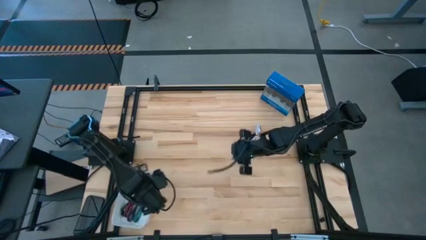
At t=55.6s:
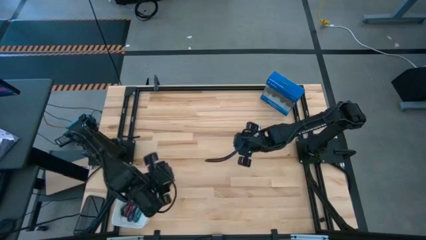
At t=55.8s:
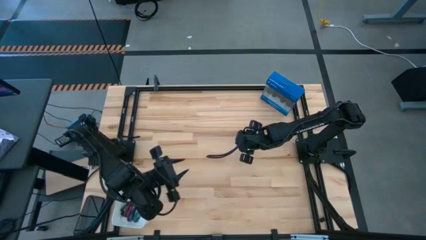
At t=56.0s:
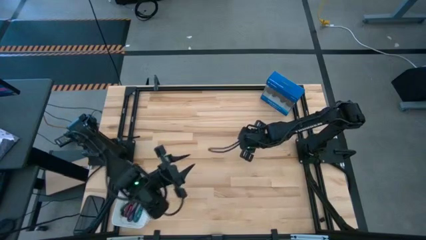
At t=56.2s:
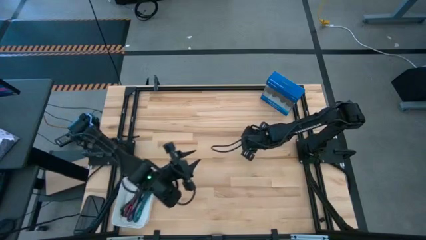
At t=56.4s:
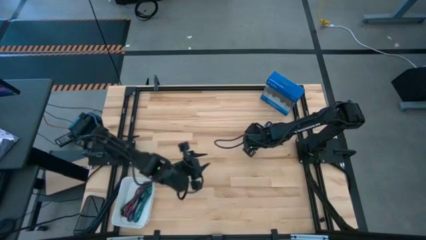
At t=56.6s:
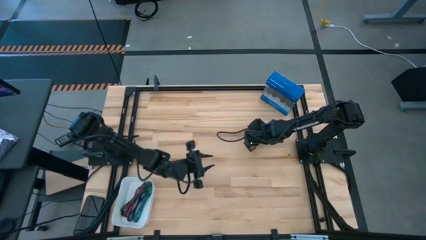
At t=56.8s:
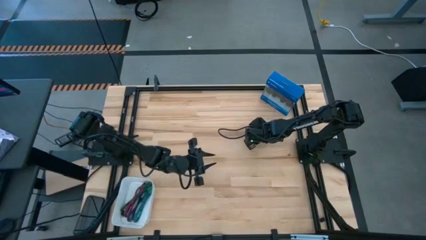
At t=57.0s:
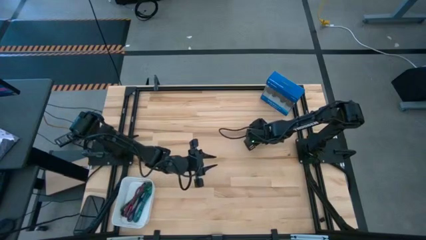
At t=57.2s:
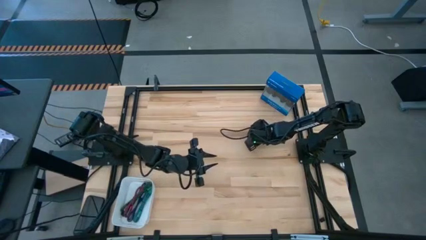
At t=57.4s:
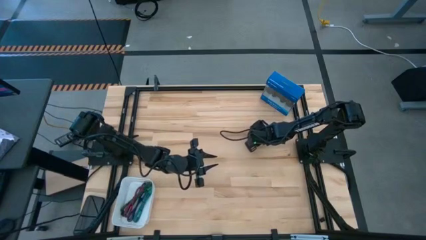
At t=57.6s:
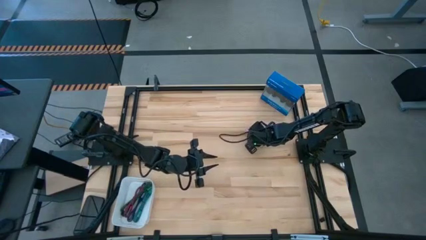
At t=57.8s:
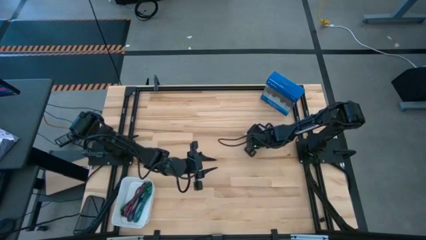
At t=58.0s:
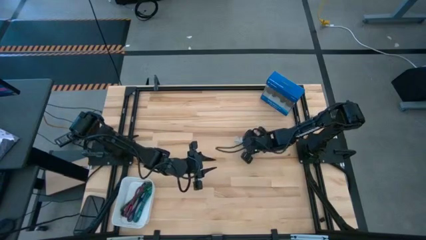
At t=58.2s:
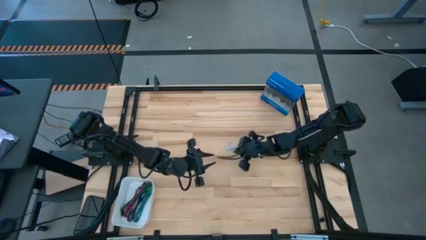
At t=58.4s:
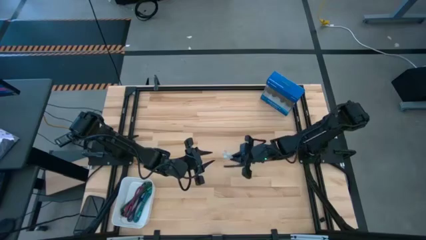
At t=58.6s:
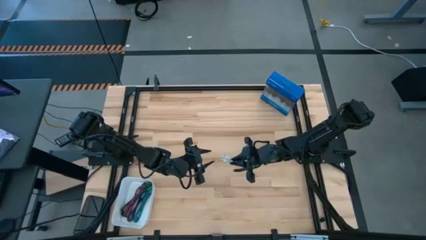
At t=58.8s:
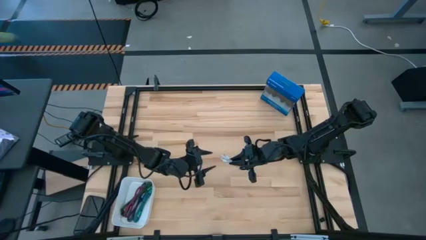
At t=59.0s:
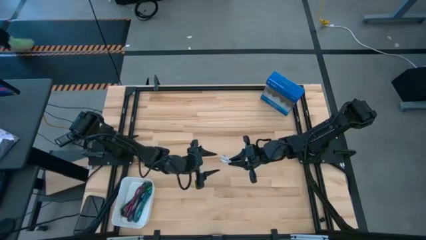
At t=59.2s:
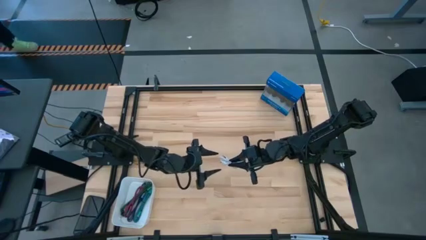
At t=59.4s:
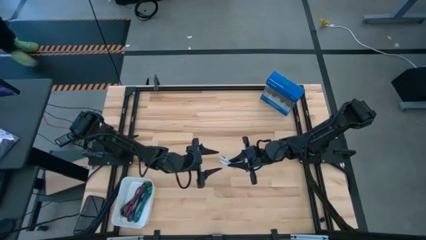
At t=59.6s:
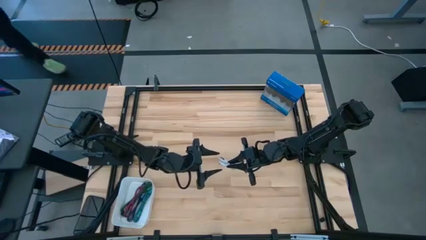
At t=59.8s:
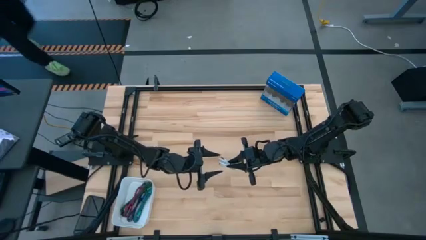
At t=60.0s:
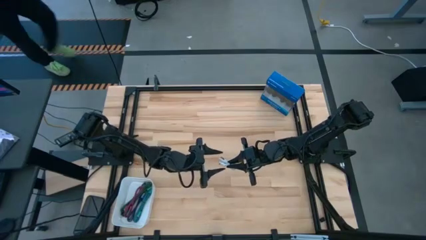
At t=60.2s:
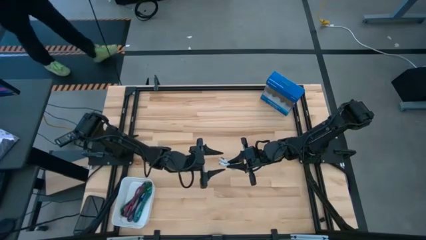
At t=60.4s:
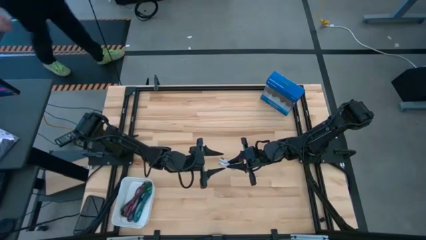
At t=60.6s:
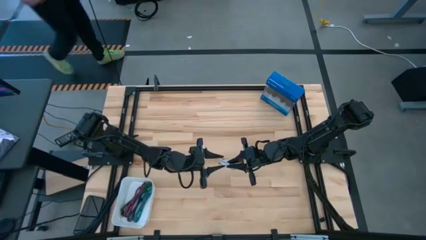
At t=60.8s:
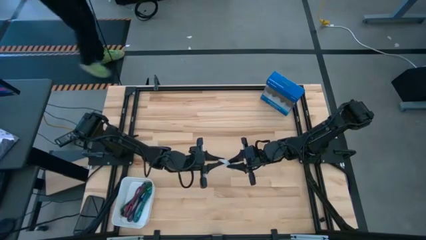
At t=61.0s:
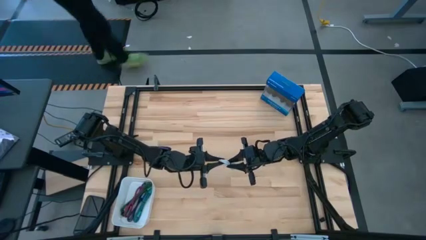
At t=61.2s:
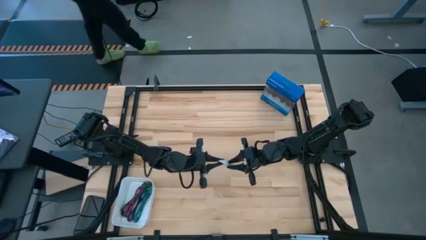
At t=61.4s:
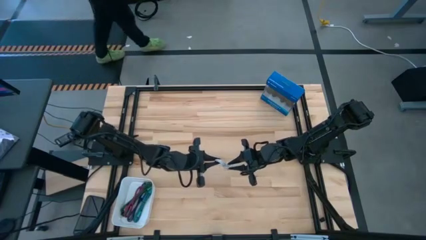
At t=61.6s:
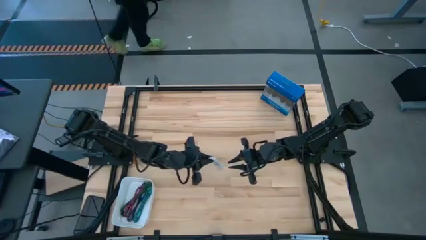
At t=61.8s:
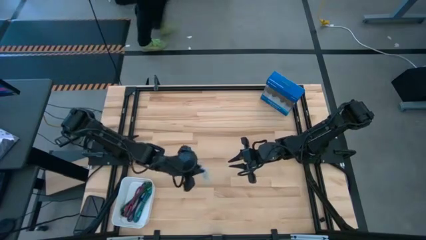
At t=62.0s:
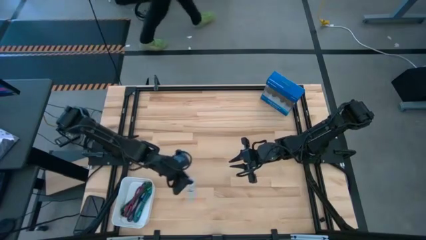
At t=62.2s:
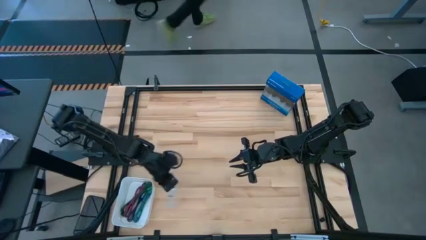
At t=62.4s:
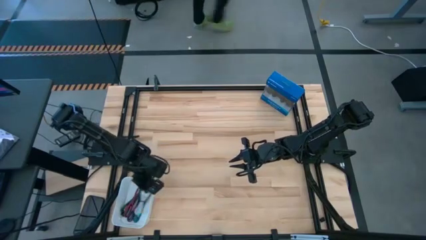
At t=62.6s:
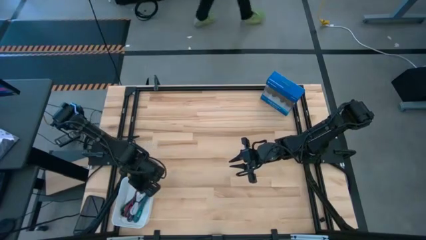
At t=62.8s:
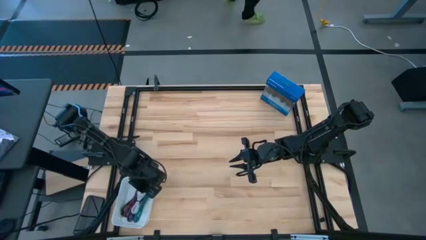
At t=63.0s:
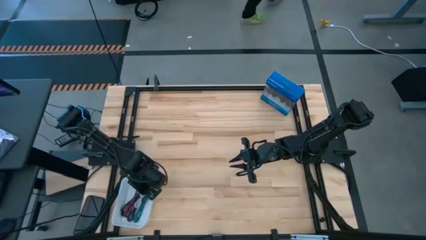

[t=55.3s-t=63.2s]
Task: Pick and place USB-C Cables
Put the white charger cable into the white bin

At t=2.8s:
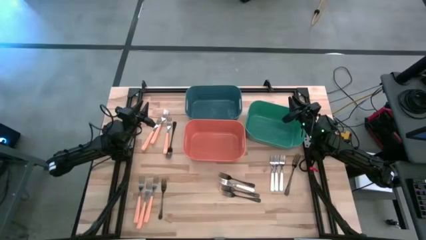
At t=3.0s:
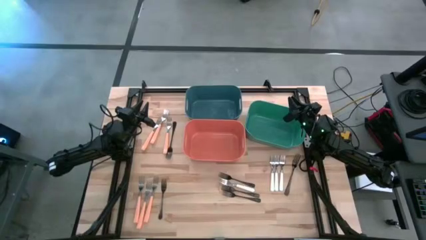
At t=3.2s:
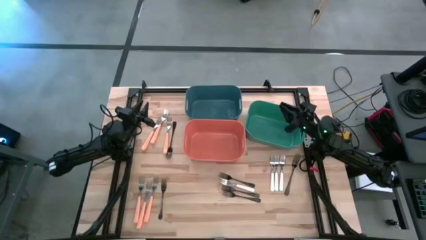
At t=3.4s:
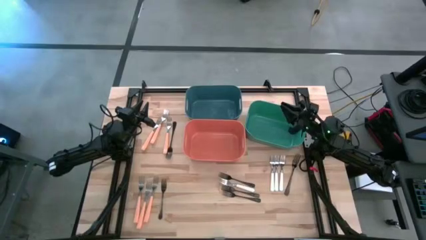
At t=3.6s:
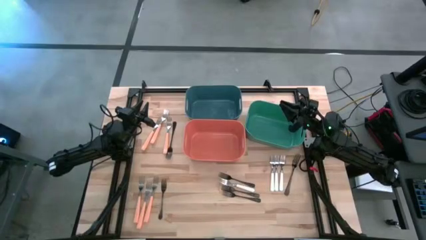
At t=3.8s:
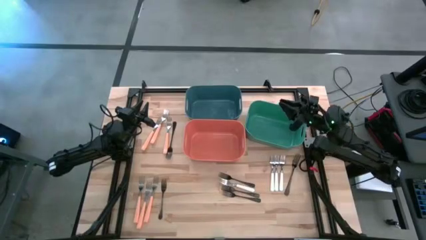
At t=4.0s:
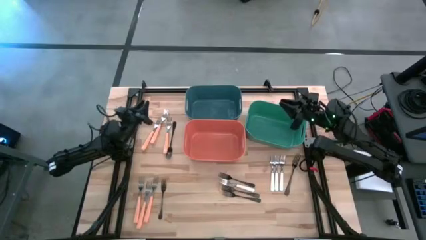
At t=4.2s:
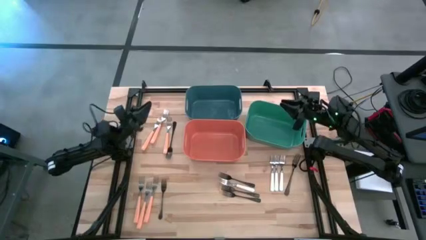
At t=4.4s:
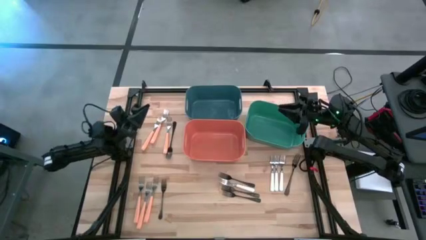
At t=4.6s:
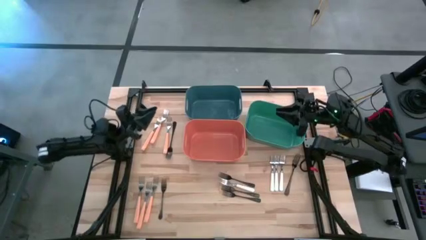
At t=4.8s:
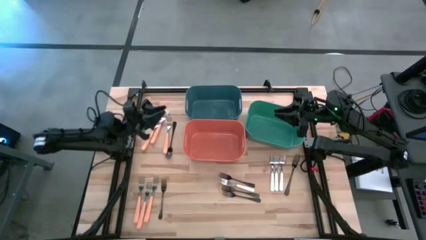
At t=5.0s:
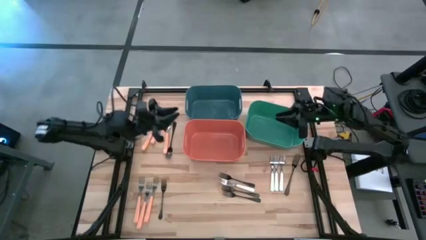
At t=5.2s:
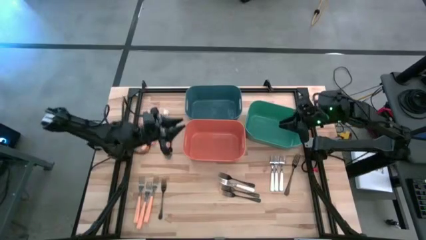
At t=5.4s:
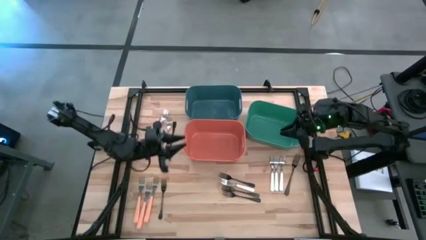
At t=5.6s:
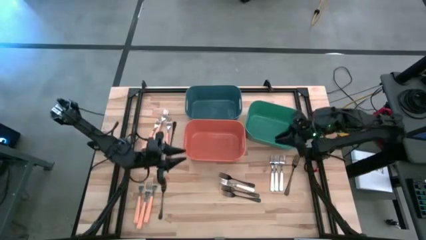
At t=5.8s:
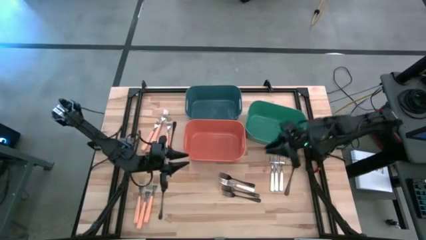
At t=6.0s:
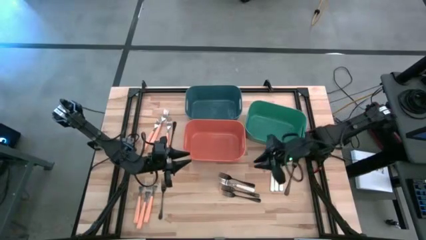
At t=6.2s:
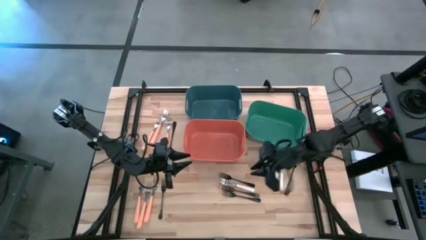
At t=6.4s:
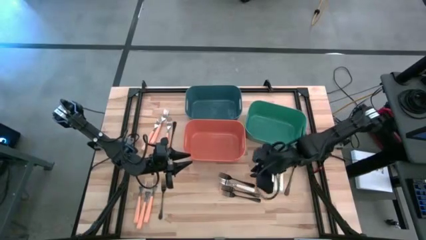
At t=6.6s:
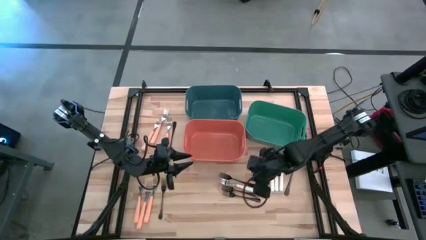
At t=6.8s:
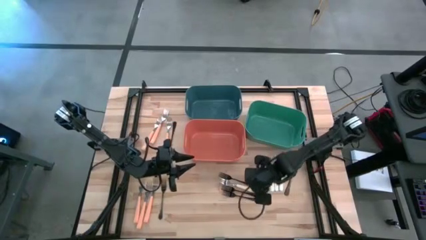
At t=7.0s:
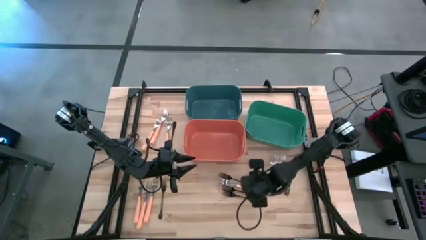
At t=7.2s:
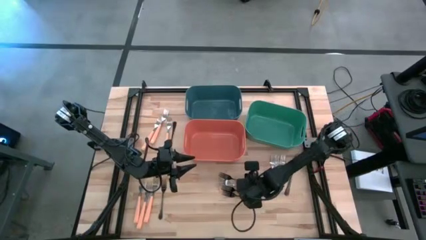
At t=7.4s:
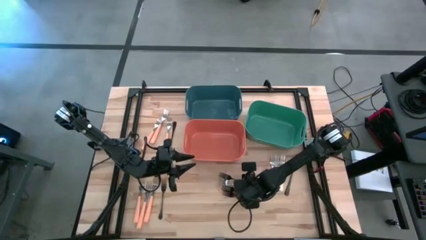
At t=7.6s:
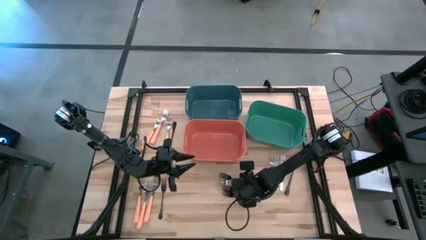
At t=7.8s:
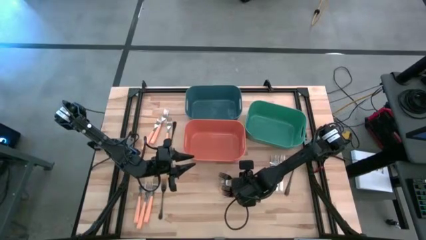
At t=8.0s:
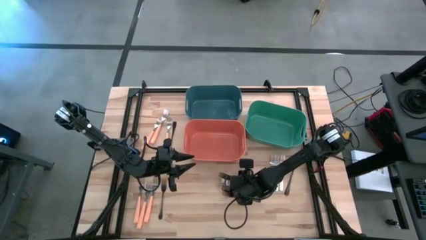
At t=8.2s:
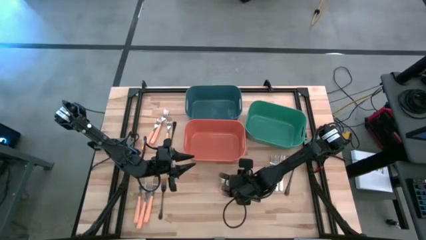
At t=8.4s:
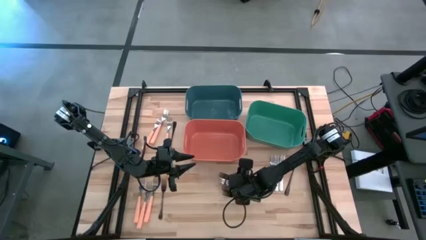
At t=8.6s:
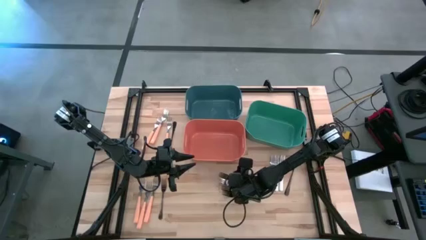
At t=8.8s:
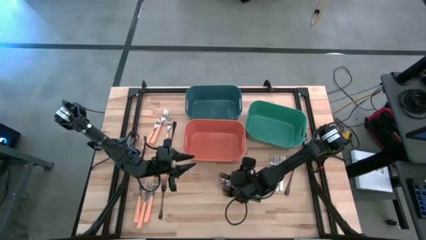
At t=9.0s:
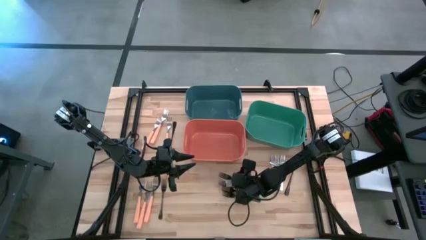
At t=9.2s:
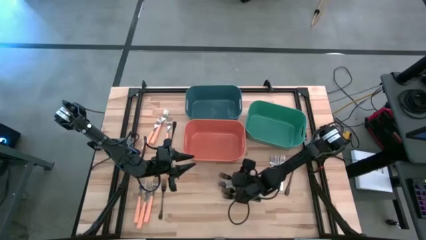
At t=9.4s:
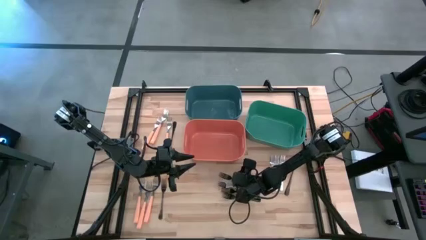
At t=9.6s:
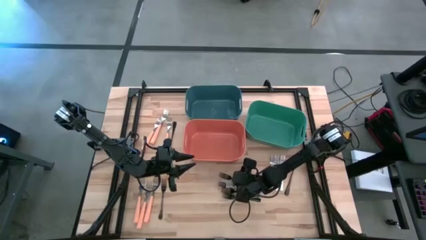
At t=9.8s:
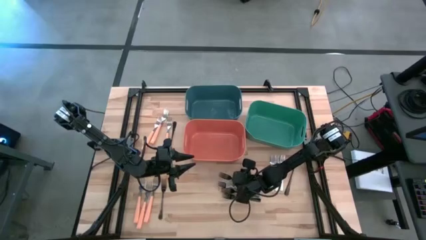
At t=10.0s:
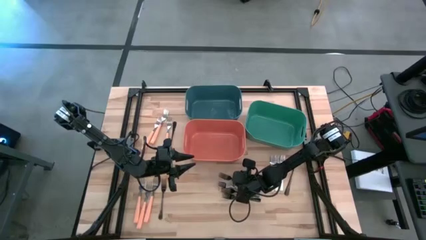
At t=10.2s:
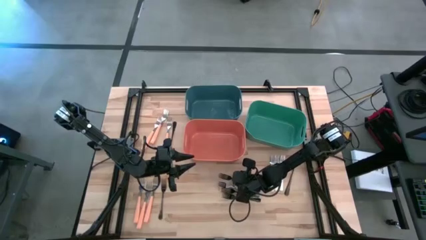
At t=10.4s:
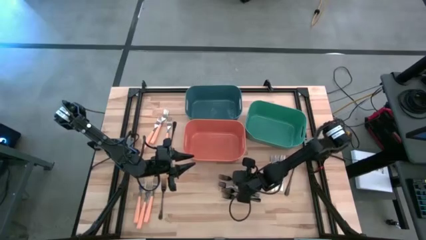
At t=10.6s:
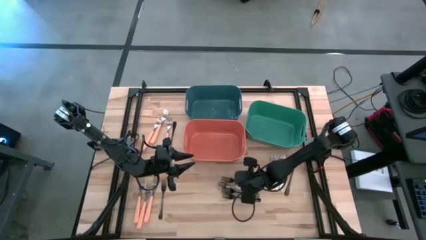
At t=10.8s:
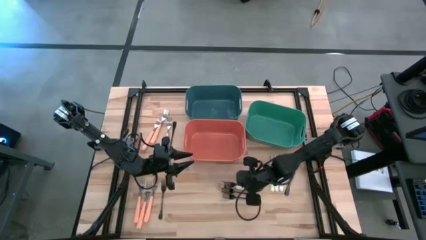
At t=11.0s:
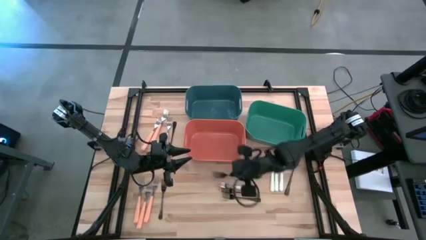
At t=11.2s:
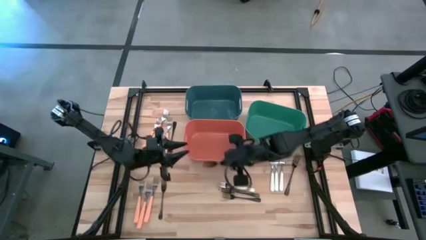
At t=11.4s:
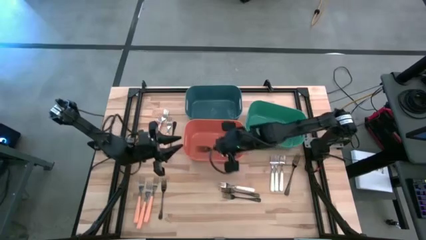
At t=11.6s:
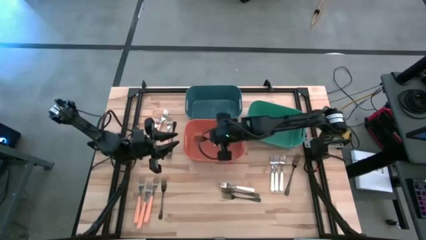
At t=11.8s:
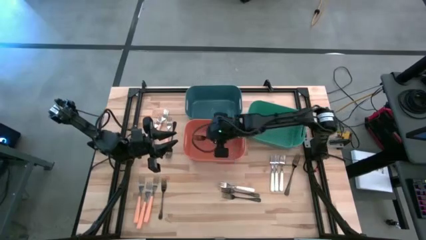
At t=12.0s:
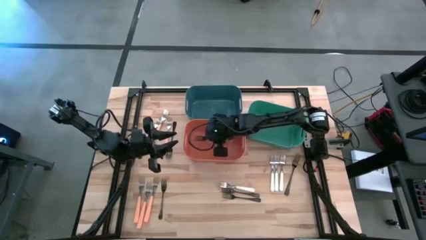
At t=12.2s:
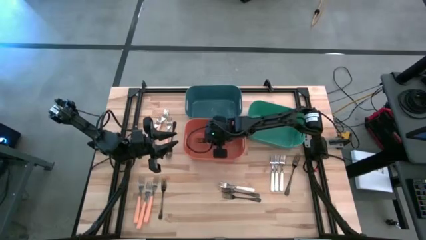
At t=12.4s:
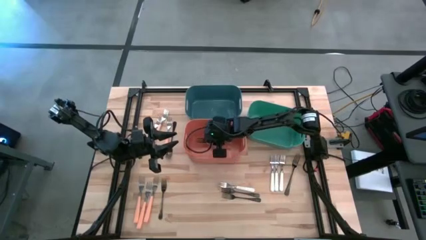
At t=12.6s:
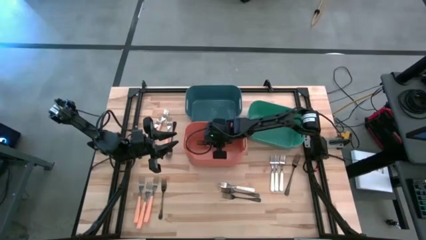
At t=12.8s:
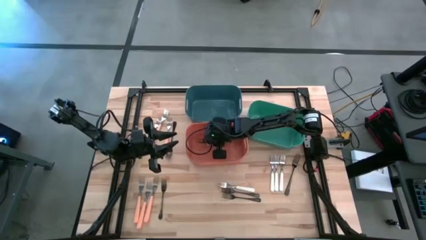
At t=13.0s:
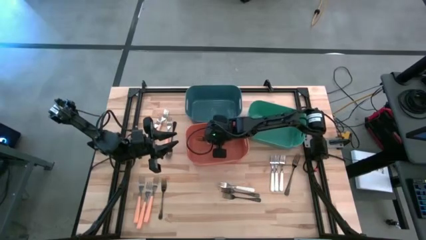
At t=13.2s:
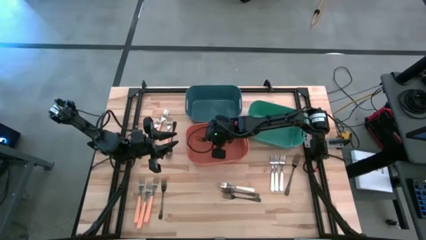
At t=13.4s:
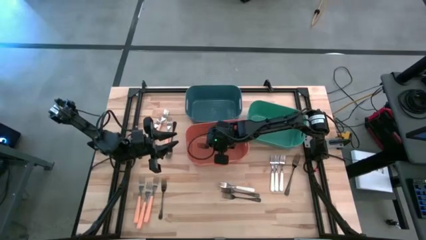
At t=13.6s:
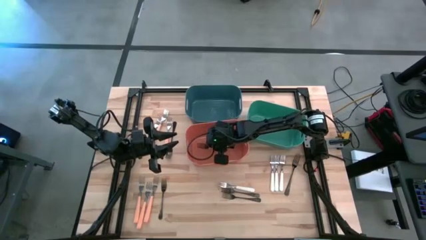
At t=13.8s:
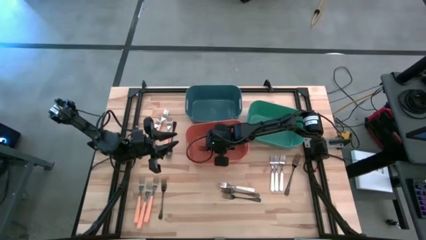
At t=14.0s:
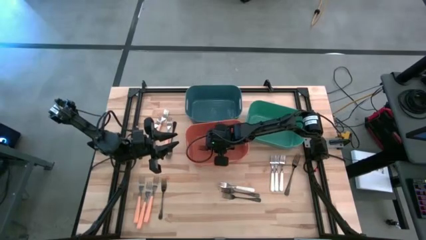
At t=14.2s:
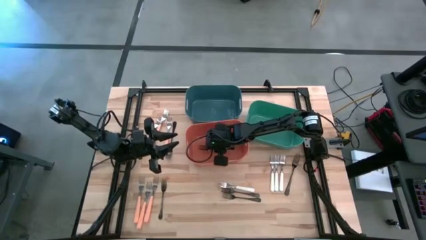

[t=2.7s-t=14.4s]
Task: Sort silverware by color (type)
Put the black fork into the orange bin
